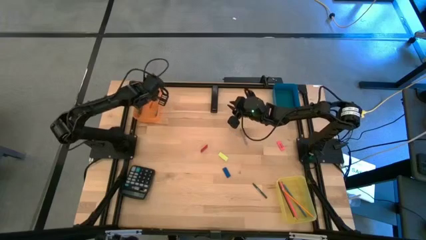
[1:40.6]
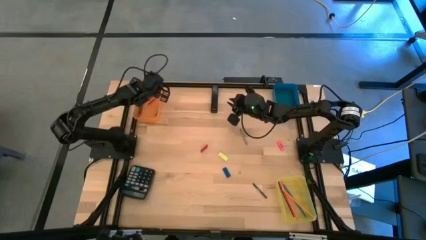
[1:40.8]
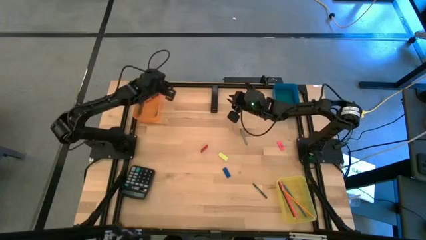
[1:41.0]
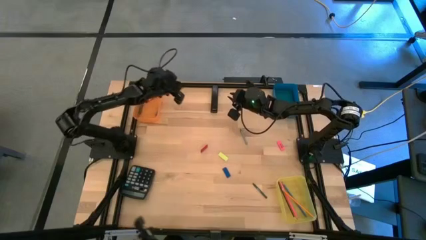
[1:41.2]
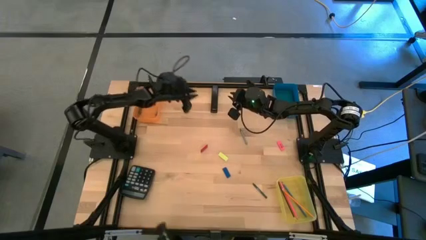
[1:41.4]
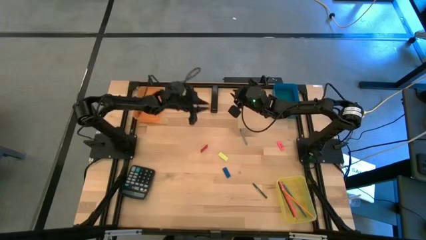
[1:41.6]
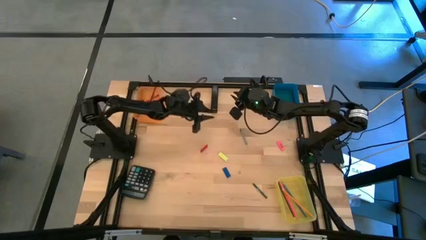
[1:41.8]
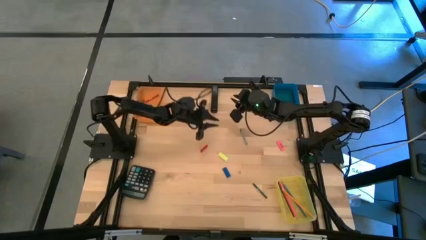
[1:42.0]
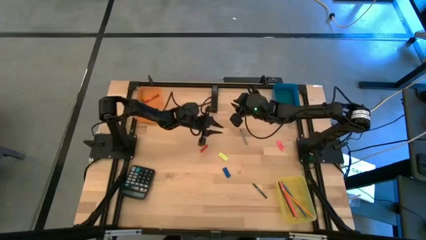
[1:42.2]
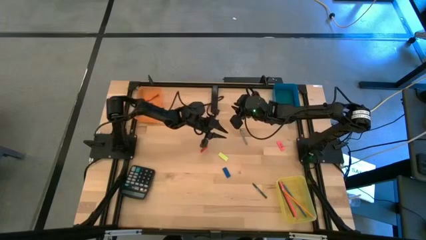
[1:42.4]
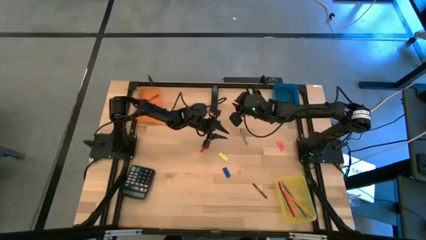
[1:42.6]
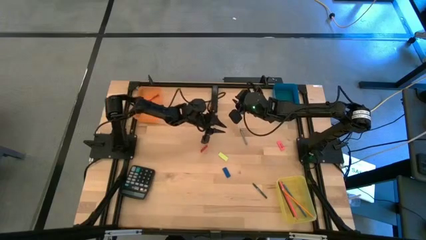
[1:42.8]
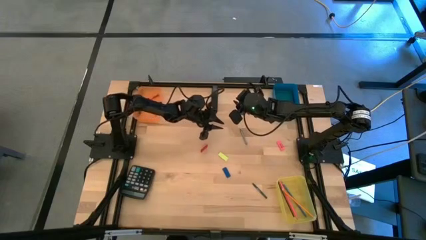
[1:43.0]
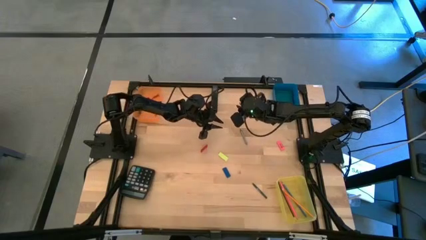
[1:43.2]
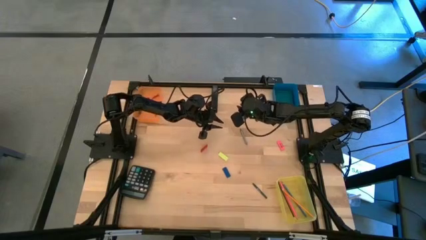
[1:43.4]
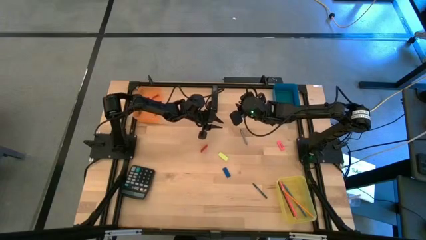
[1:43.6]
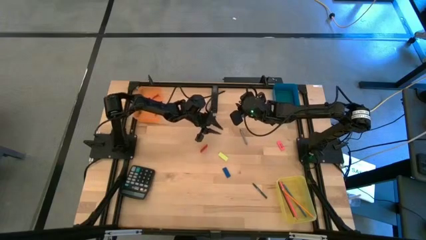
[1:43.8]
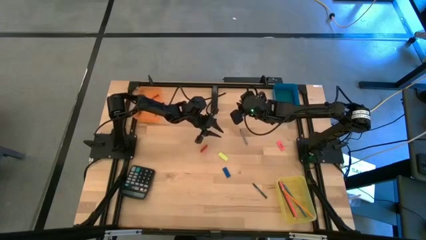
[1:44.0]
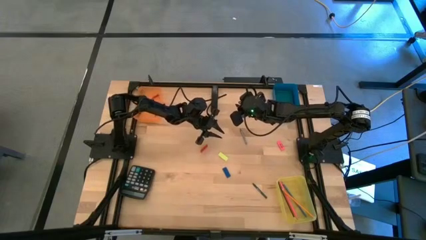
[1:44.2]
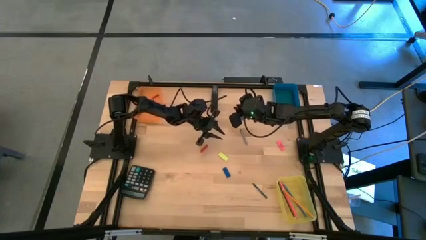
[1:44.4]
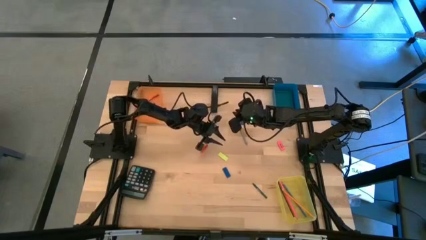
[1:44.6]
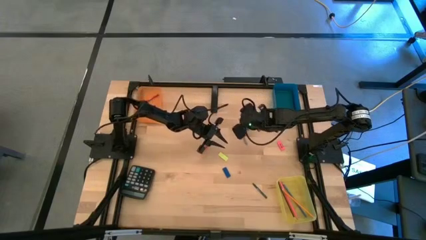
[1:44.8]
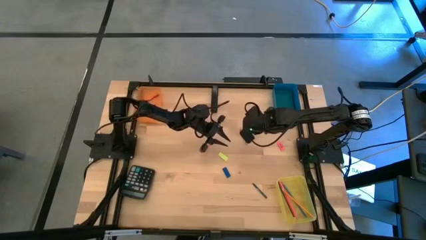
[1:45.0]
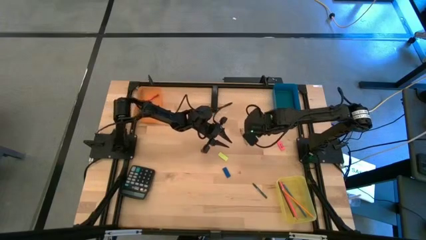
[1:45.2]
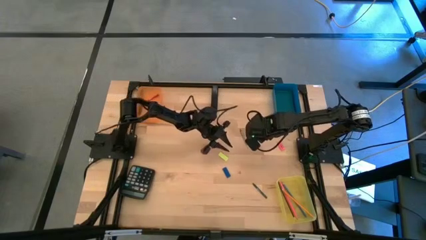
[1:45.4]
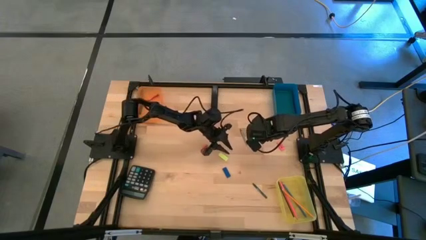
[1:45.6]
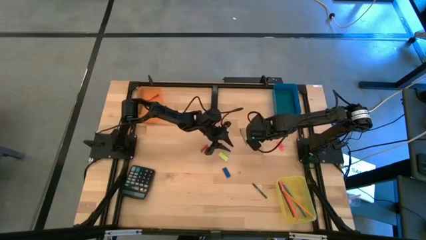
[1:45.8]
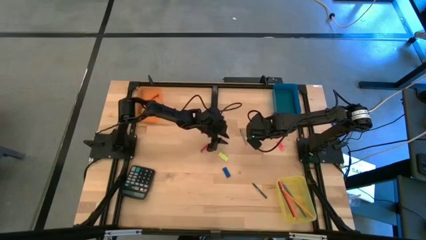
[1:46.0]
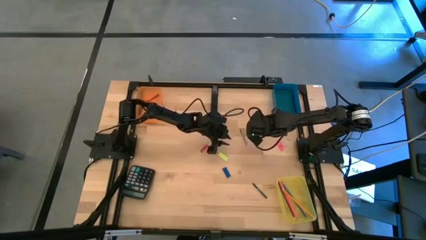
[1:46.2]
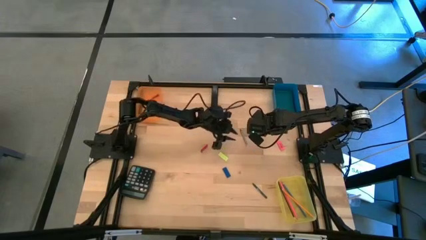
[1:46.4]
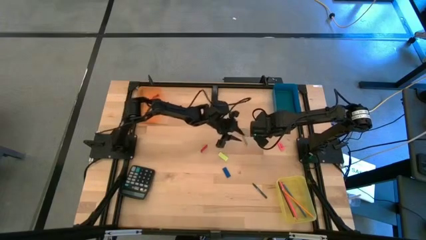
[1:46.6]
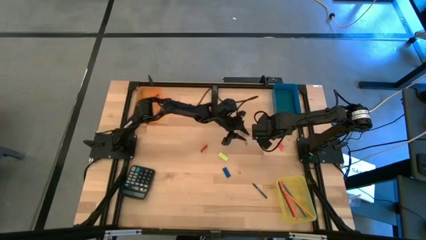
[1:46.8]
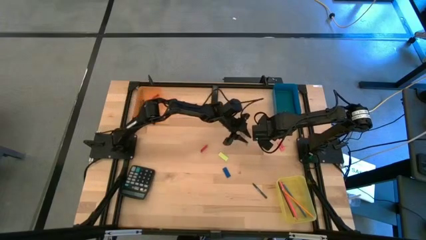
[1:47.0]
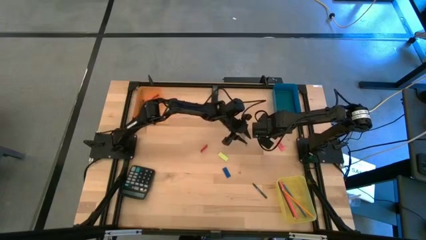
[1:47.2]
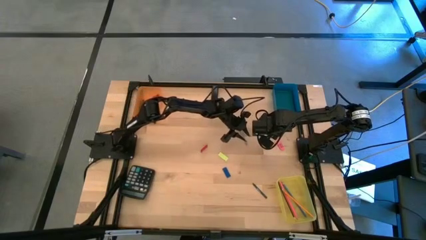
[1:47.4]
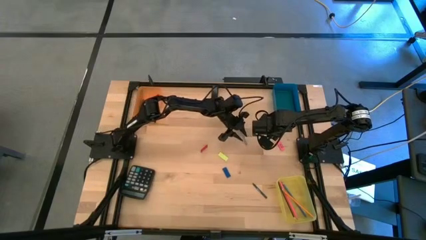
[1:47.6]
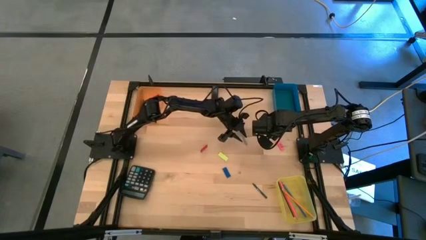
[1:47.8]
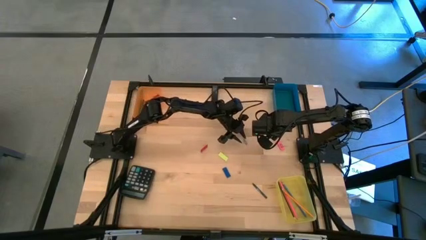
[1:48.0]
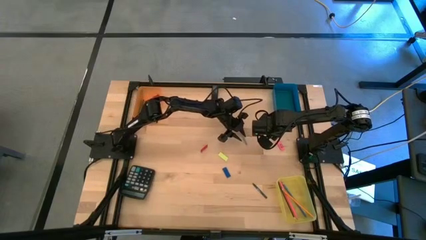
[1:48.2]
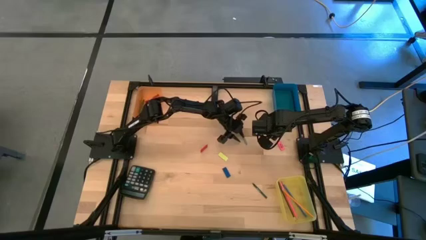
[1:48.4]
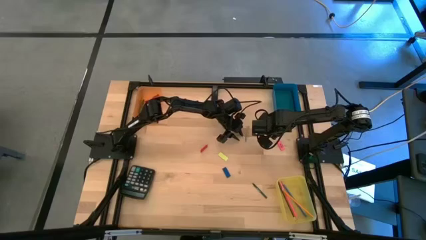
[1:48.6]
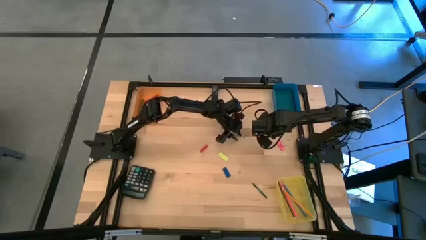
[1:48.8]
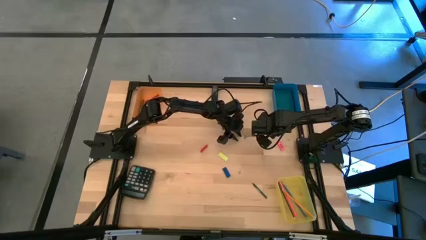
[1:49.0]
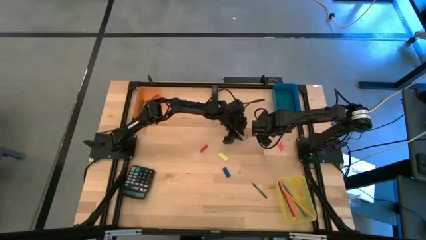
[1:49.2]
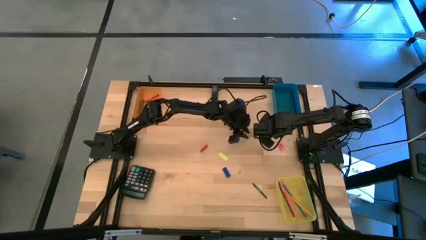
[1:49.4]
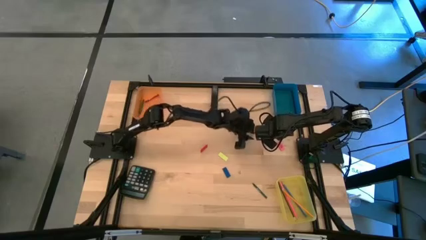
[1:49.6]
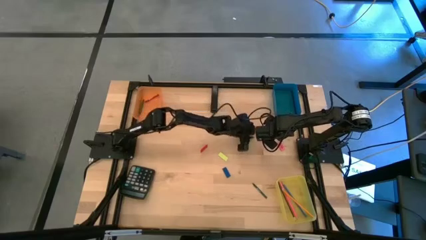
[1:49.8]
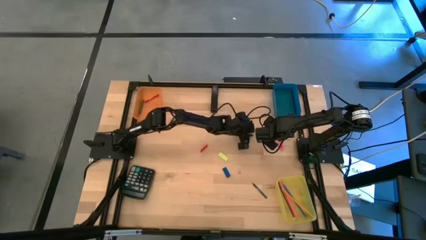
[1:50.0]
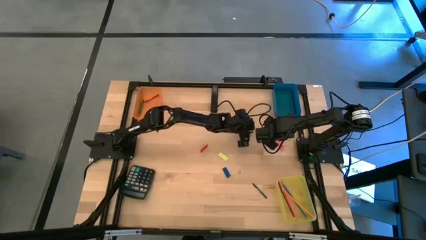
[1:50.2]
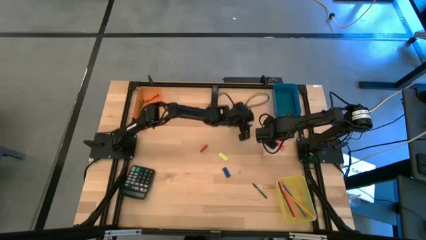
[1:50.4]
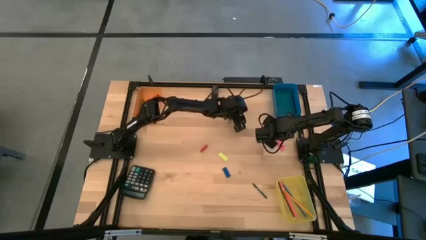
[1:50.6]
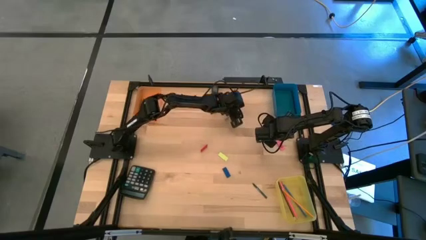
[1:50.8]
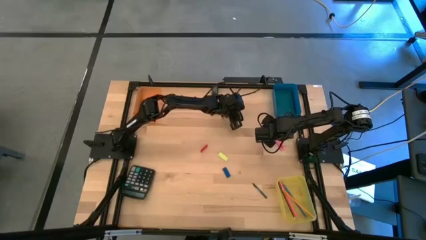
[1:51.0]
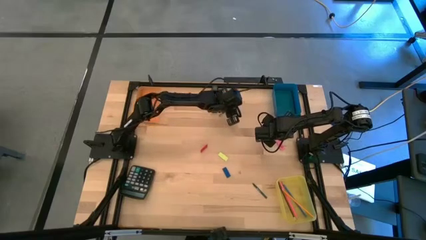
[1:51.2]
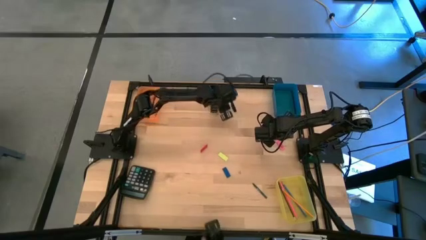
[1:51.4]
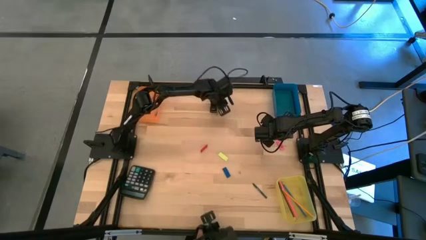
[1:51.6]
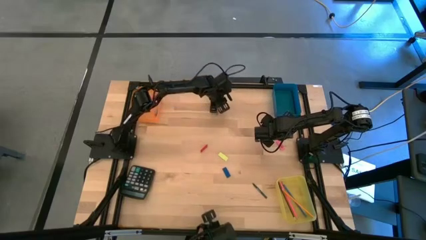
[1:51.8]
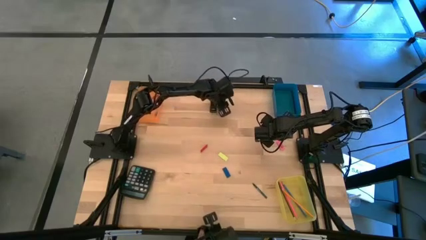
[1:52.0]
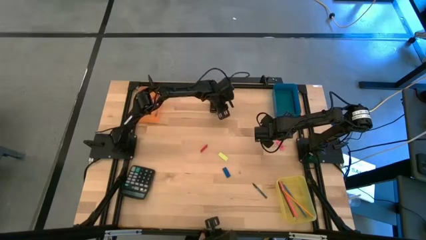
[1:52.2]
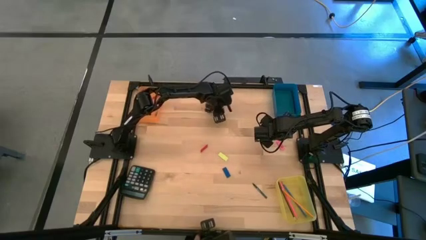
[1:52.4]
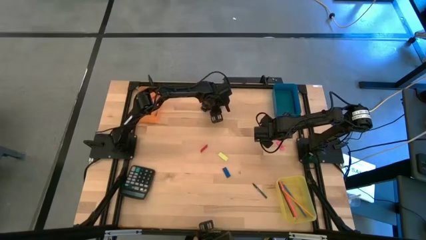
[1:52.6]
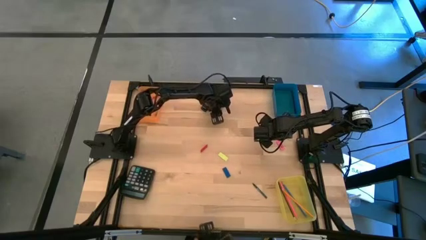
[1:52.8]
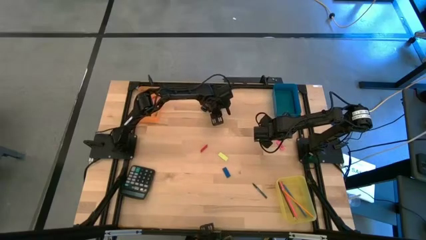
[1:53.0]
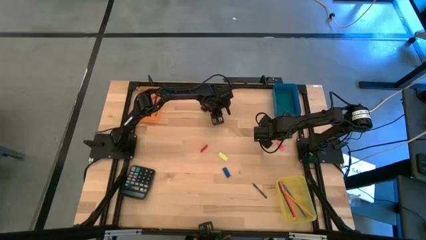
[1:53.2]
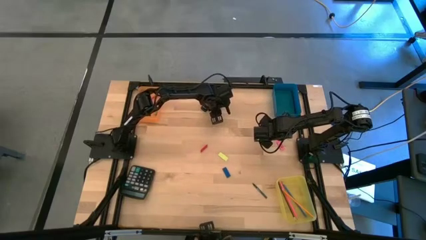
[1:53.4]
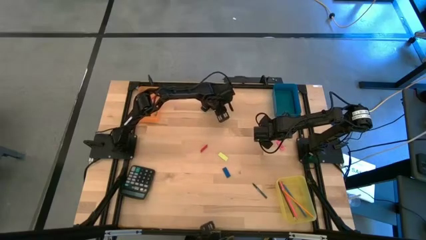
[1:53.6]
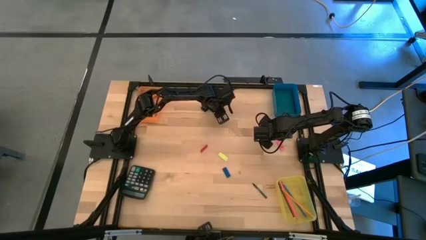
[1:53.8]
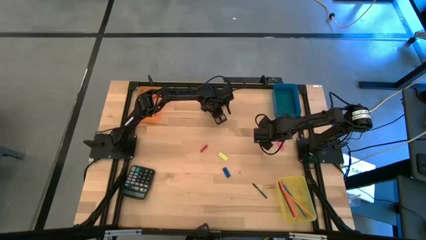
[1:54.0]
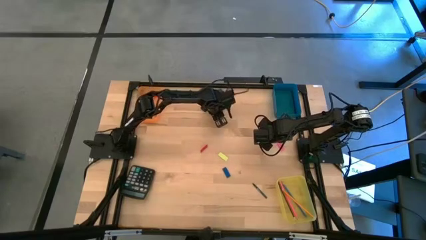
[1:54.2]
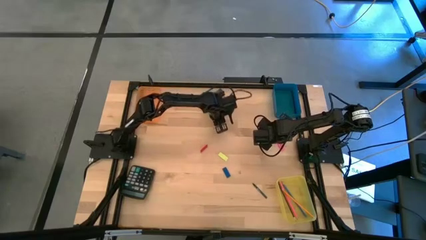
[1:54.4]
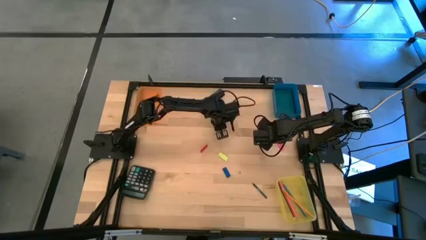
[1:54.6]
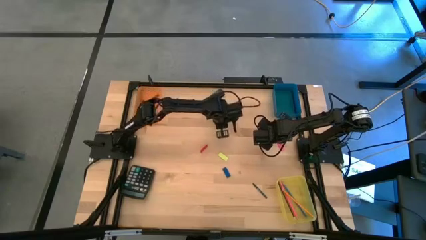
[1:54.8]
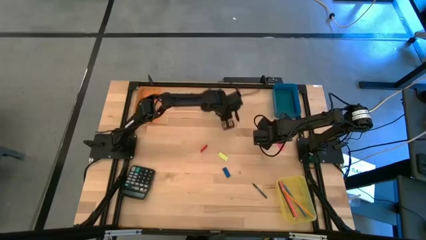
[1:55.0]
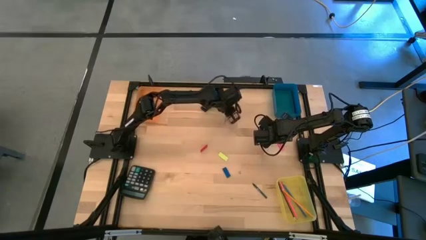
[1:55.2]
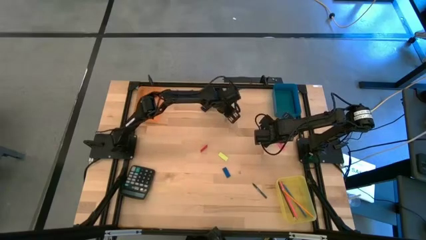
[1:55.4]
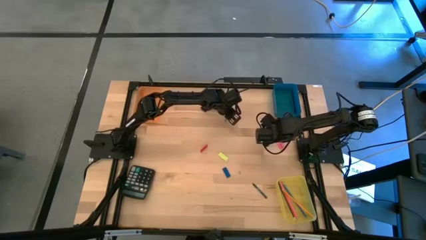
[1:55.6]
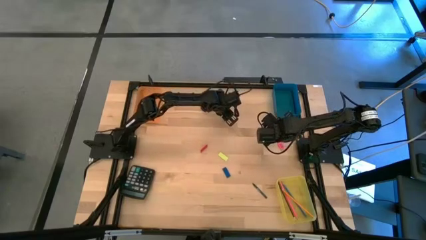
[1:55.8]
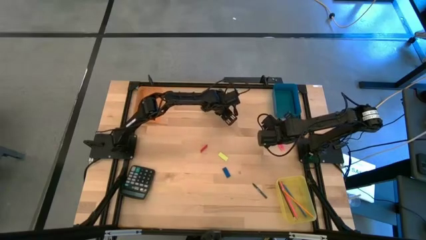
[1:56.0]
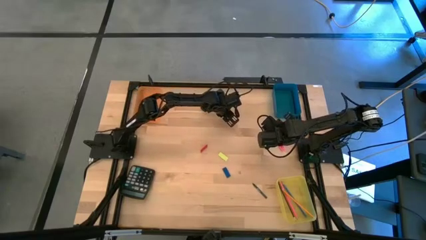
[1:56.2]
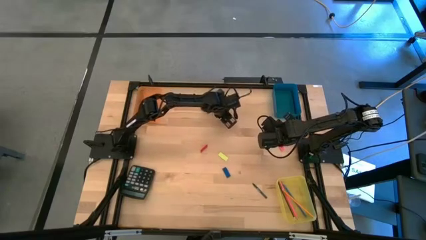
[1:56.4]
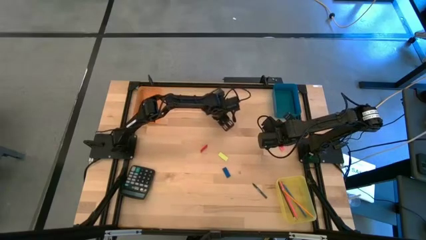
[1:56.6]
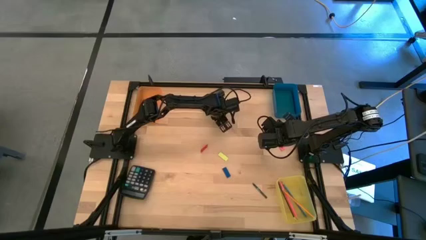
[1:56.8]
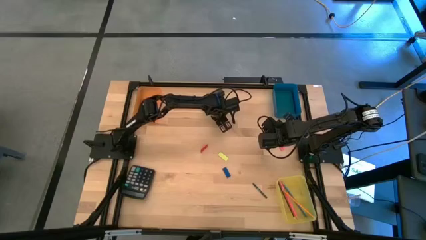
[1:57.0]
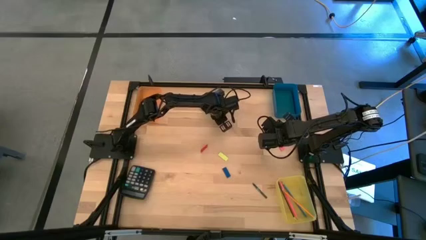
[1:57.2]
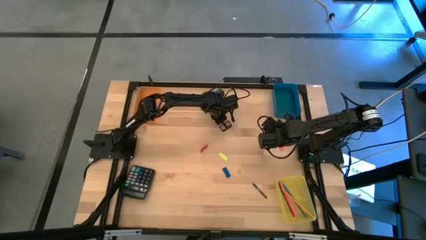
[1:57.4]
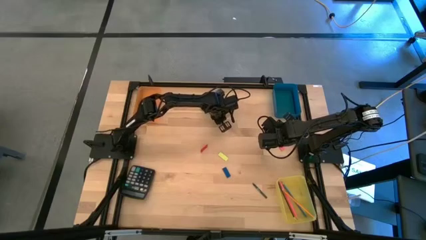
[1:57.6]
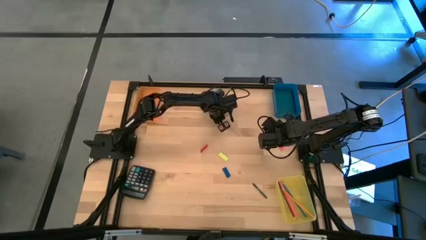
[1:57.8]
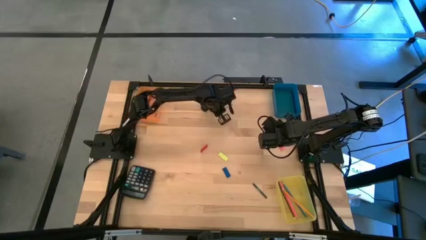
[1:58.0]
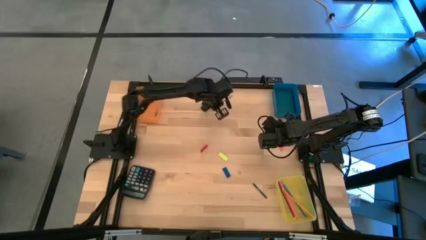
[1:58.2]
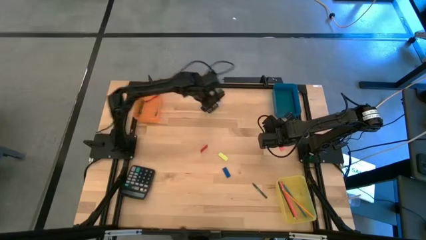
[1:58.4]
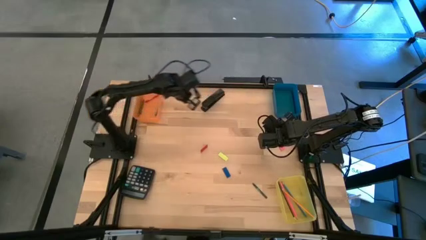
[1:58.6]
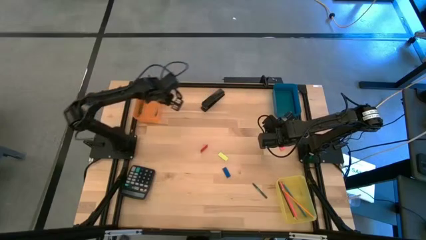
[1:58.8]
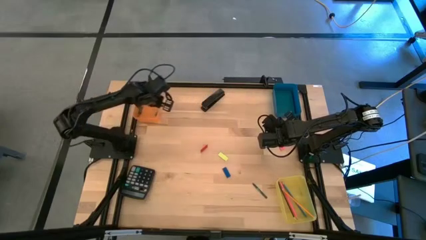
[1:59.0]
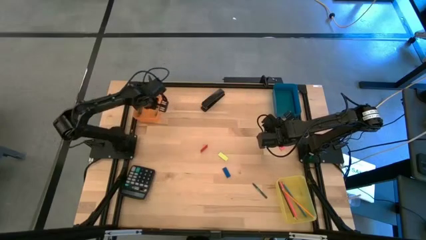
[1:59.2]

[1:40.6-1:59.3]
Task: Sort crayons/erasers/pens/pencils in bins
Put the gray crayon into the orange bin
